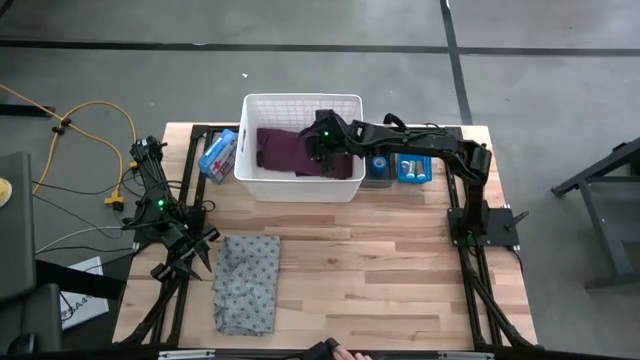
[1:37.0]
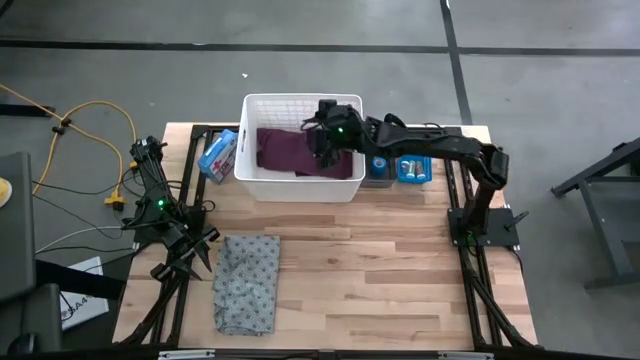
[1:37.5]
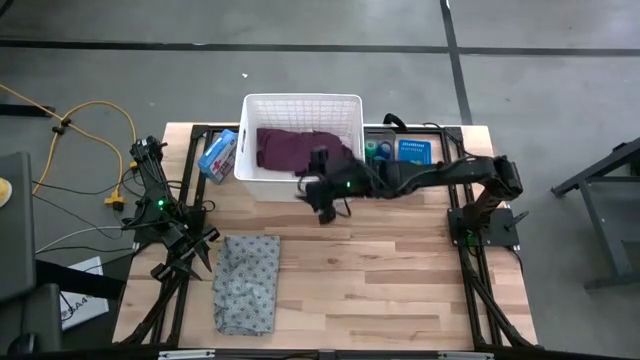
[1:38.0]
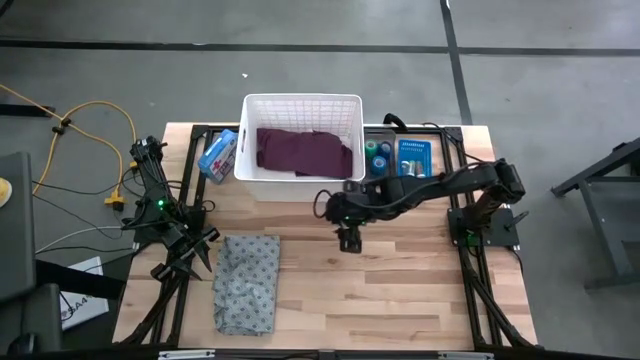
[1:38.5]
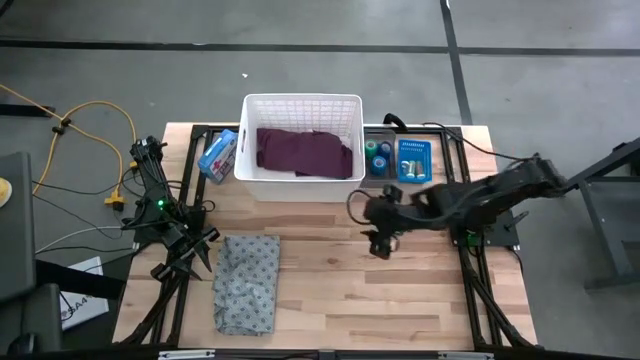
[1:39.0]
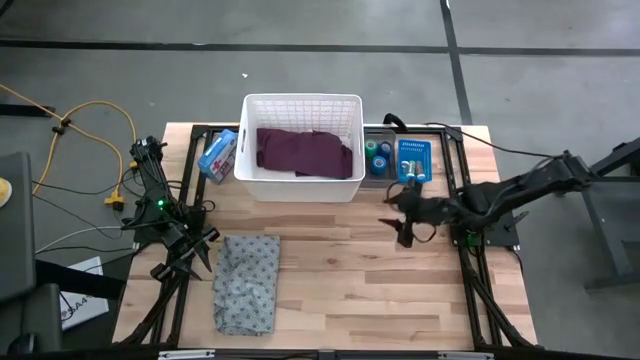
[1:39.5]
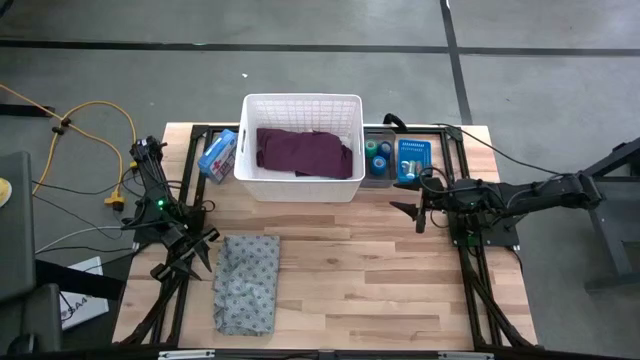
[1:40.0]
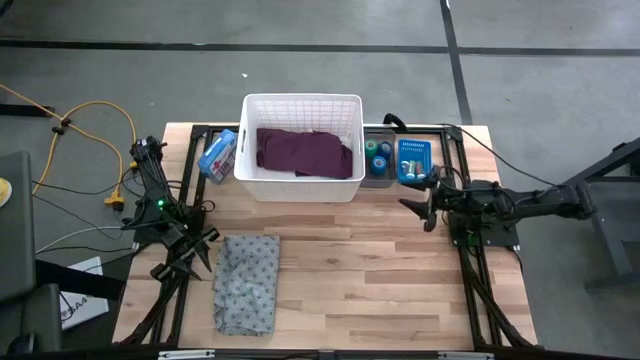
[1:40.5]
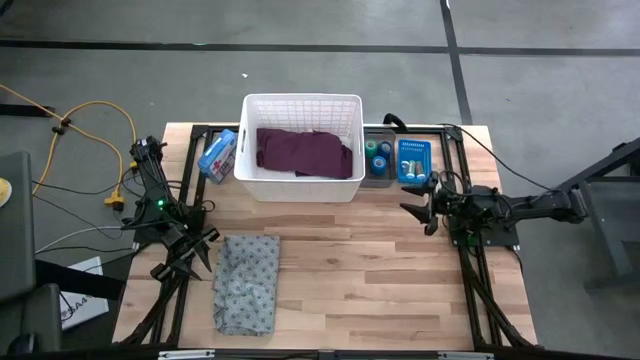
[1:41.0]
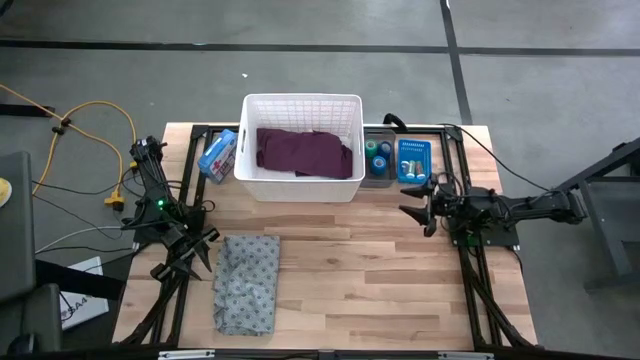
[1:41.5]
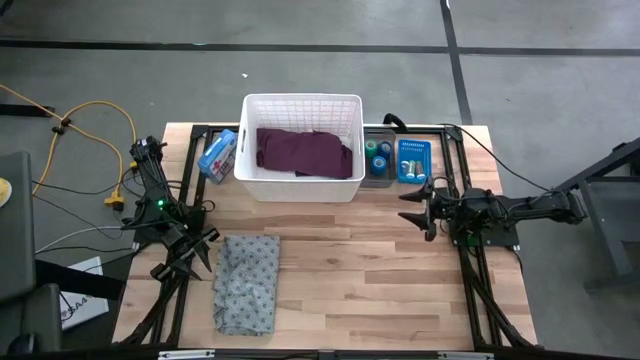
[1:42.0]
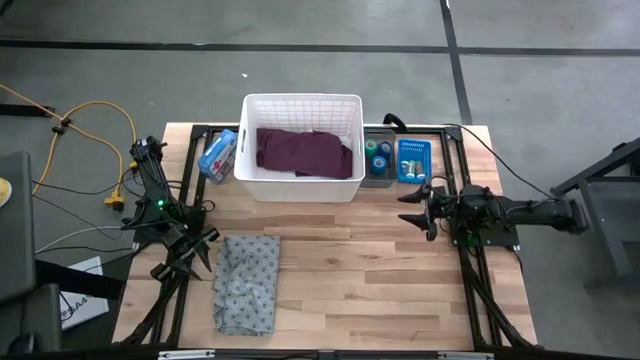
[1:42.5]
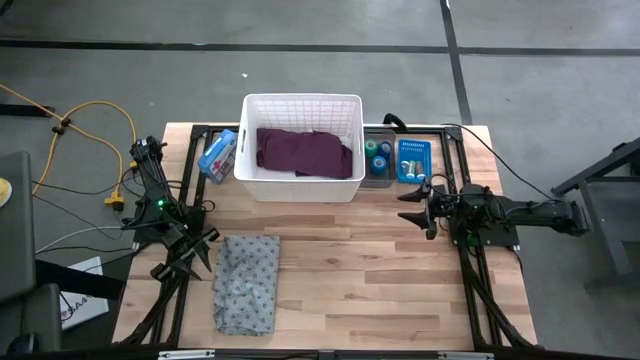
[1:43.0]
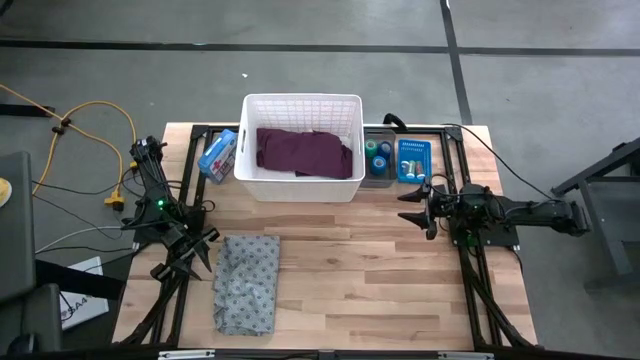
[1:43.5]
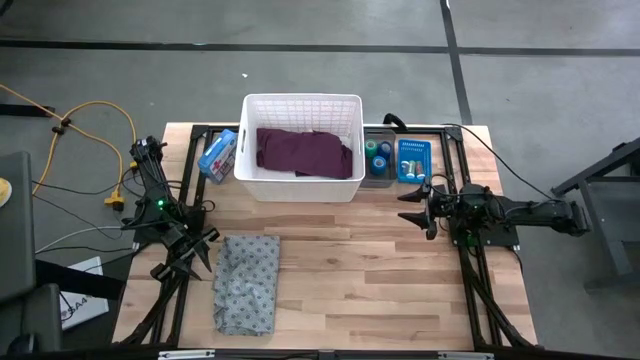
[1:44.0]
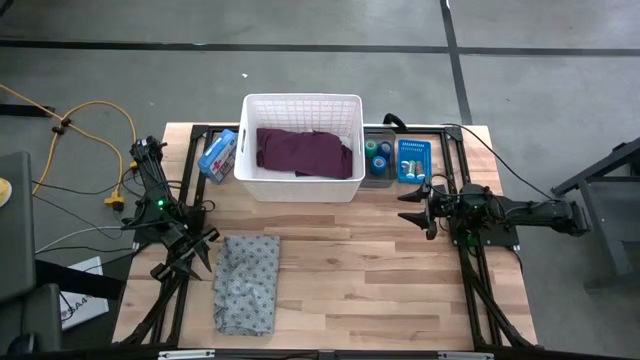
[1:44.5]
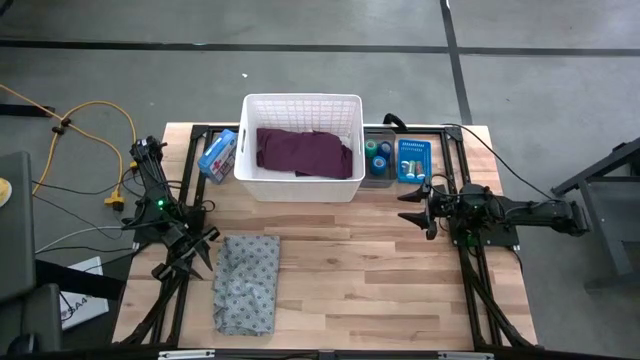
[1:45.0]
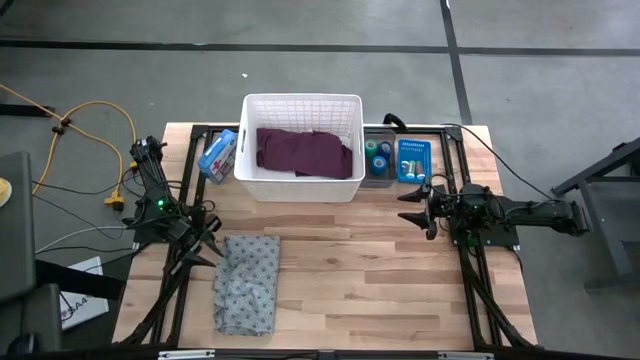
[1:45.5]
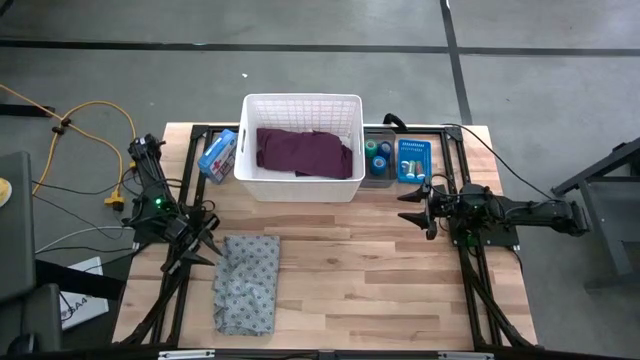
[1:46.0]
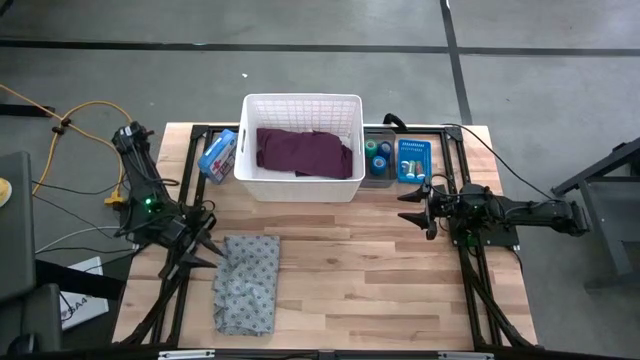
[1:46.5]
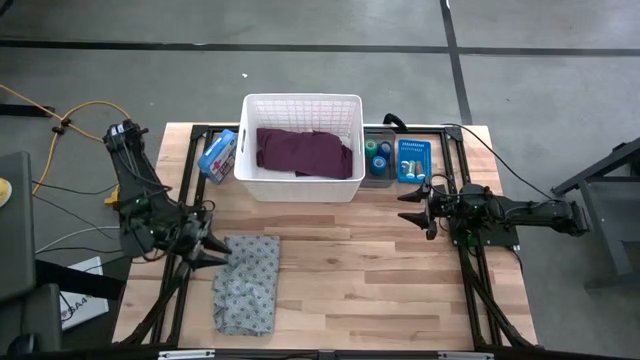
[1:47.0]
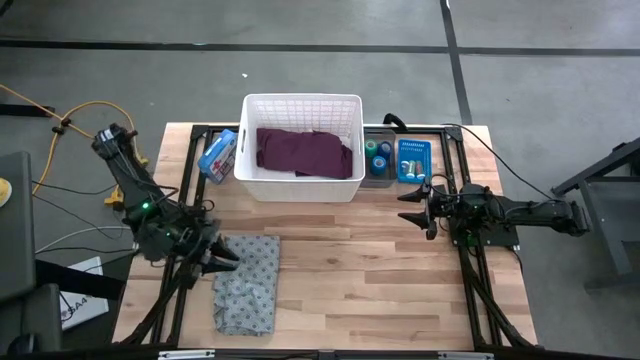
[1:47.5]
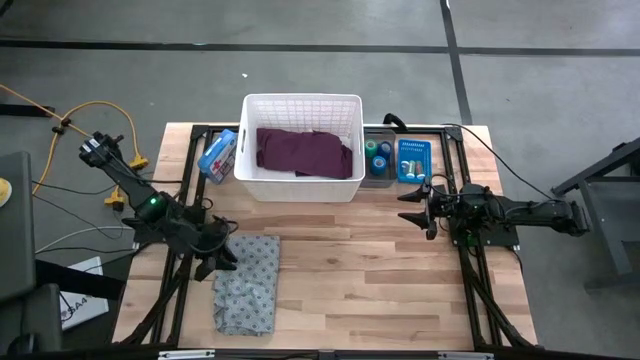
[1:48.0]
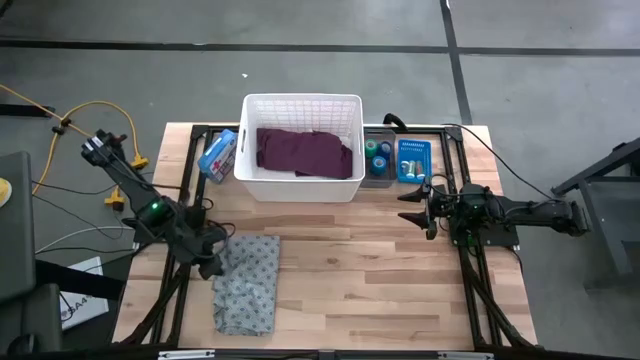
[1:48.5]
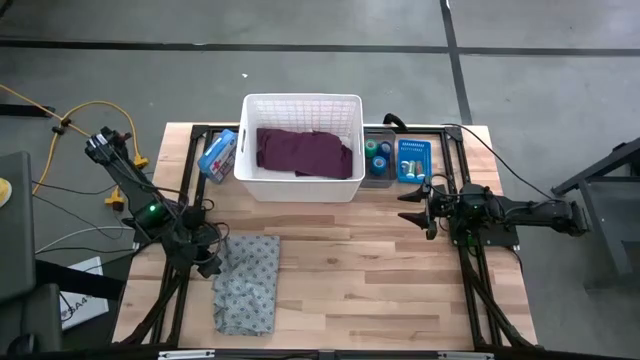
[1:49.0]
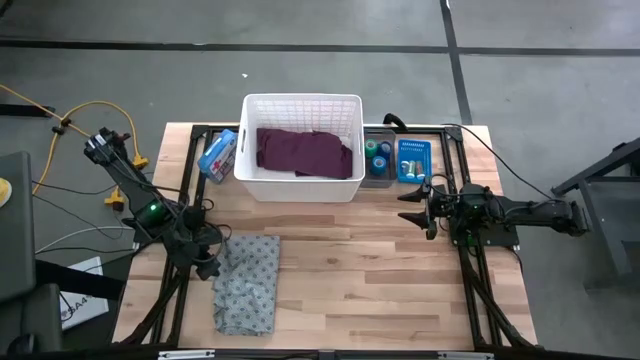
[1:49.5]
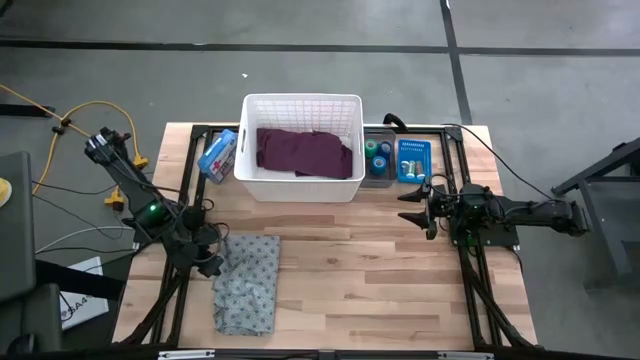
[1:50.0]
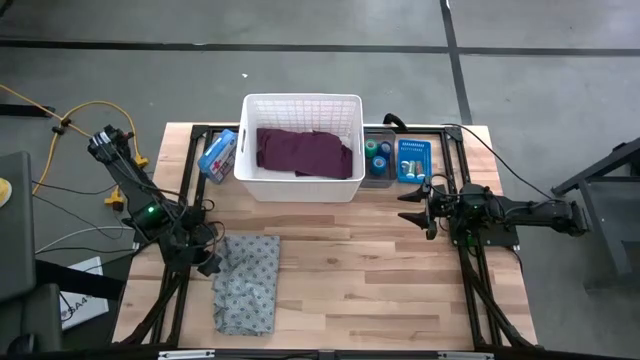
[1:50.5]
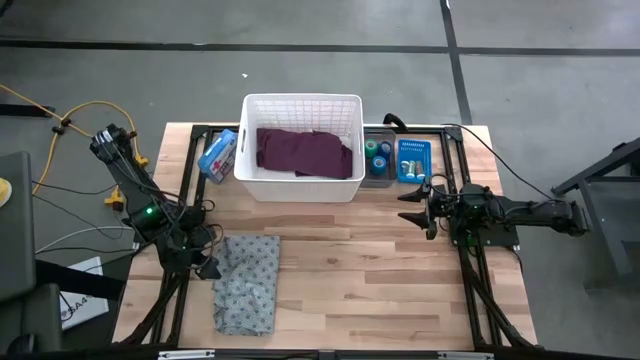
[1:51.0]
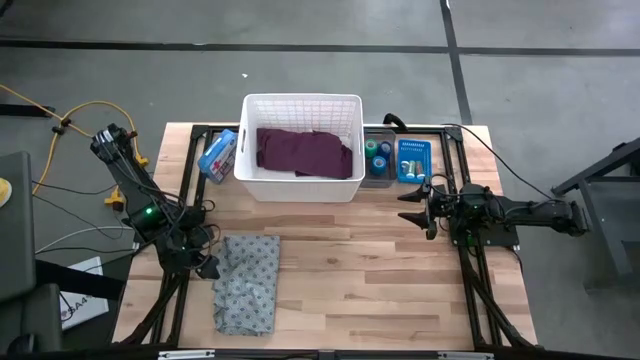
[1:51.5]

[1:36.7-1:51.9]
Task: Pick & Place Medicine items
Put the gray patient gown into the white laundry bin

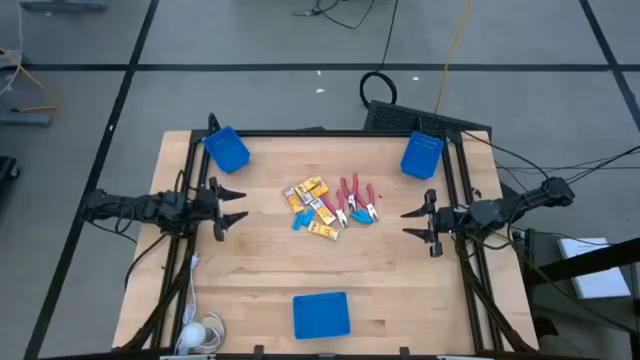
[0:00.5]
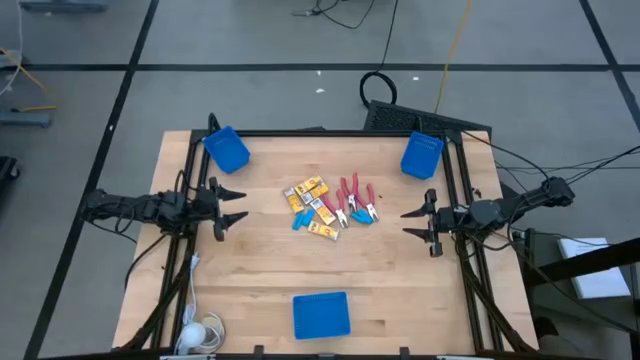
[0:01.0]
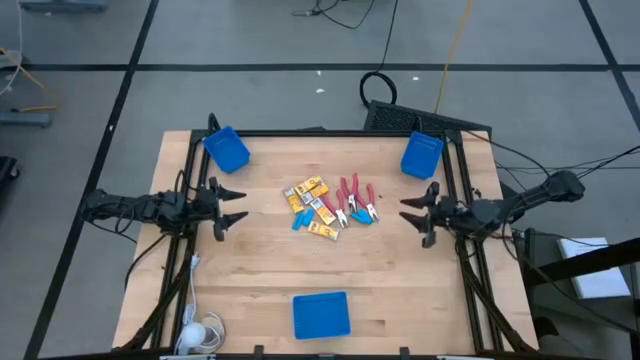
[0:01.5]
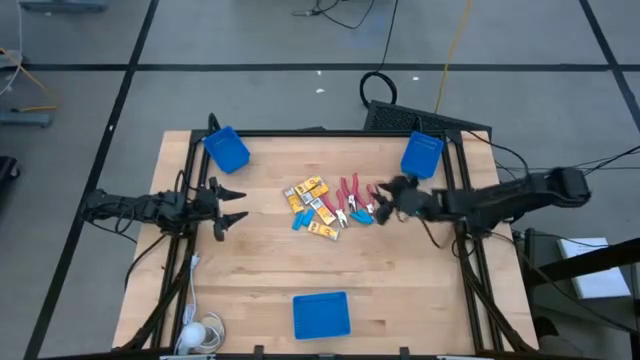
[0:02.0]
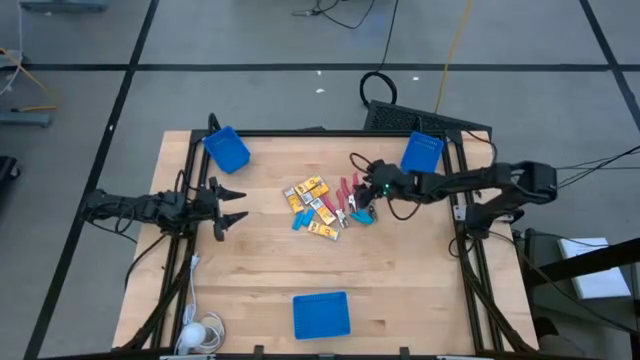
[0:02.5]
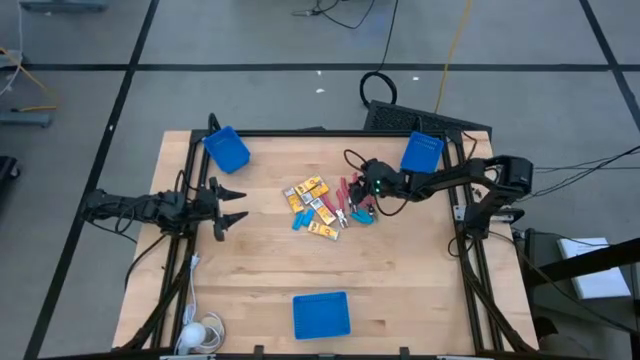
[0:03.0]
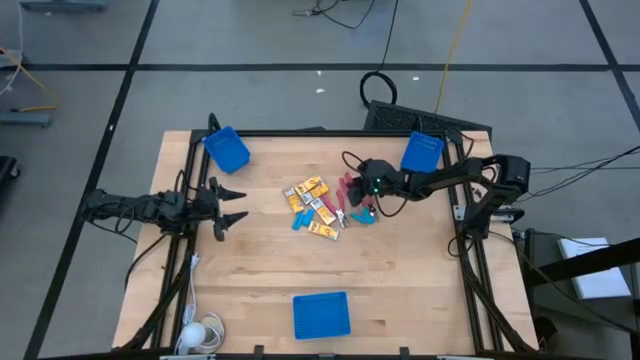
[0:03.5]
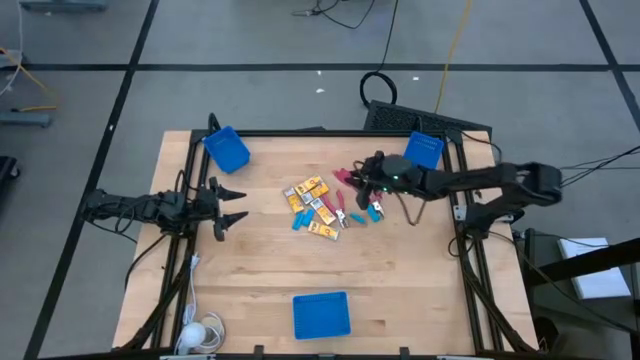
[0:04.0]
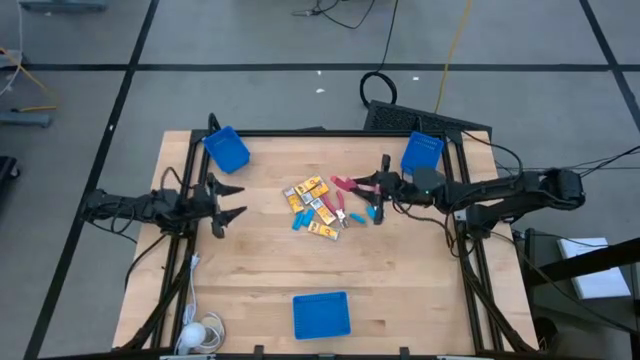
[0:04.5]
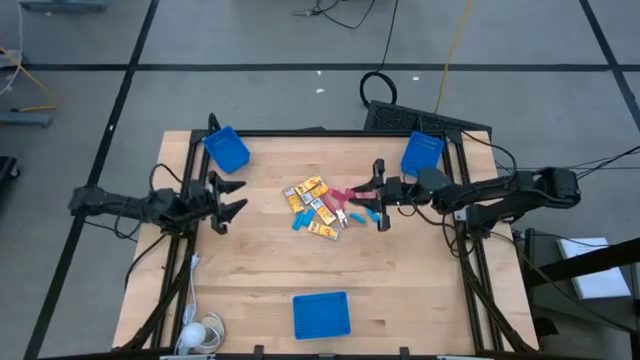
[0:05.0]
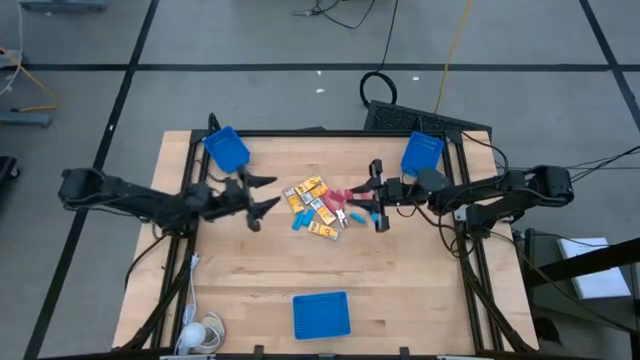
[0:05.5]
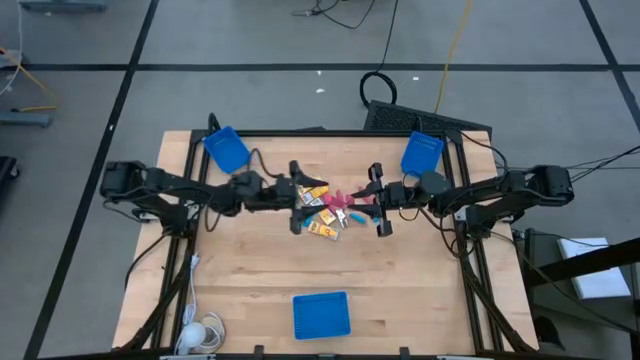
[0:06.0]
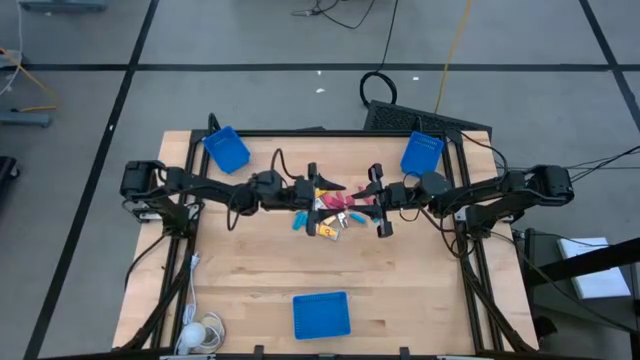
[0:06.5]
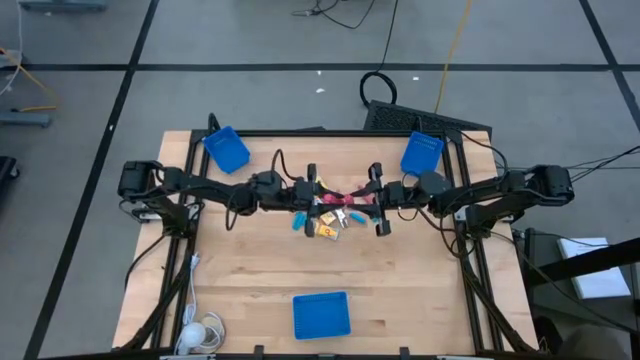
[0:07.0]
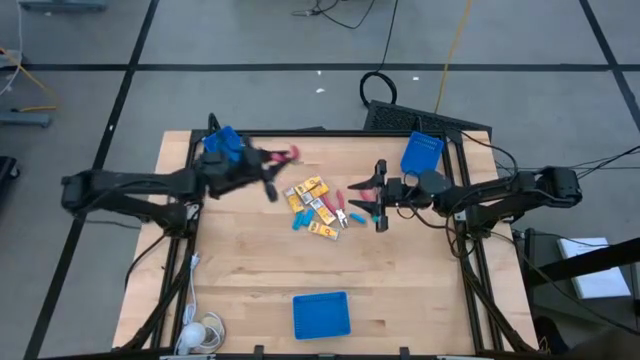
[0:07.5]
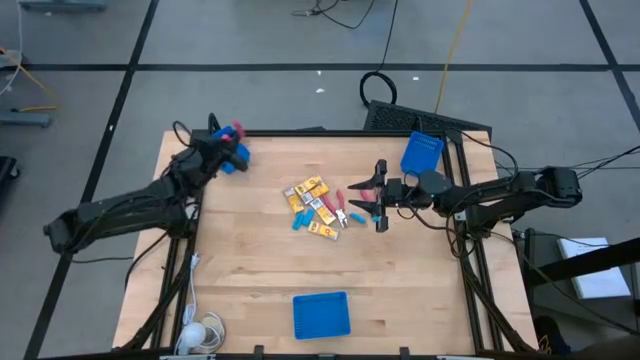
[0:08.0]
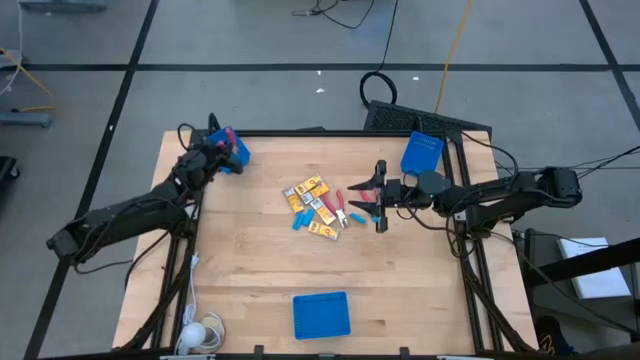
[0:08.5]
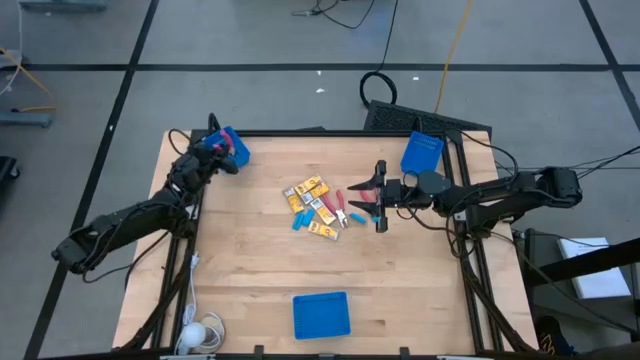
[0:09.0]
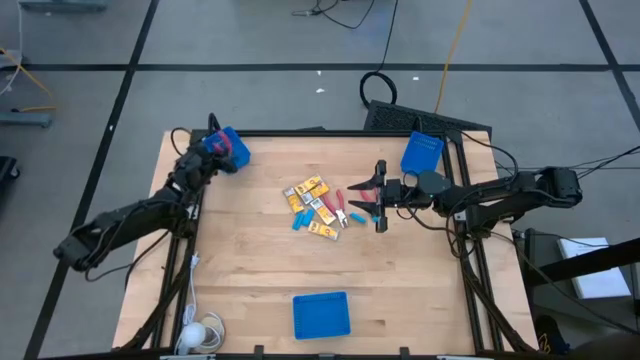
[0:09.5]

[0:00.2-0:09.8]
Task: Pick & Place School Supplies
Put the pink ticket punch into the left blue bin
